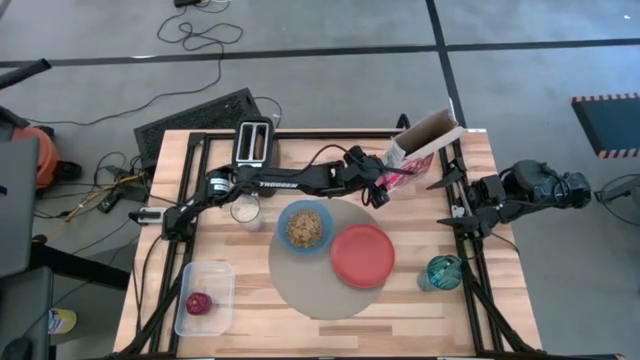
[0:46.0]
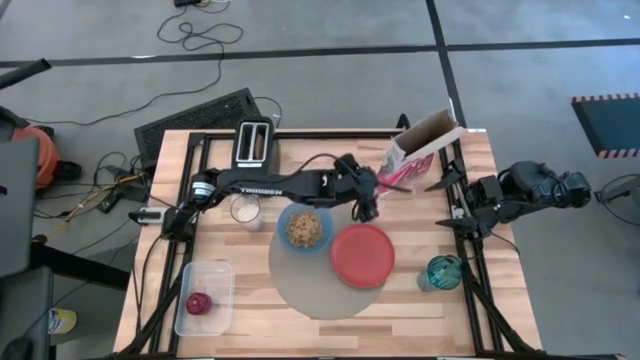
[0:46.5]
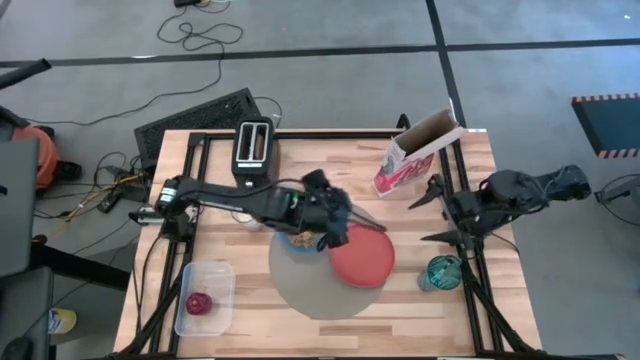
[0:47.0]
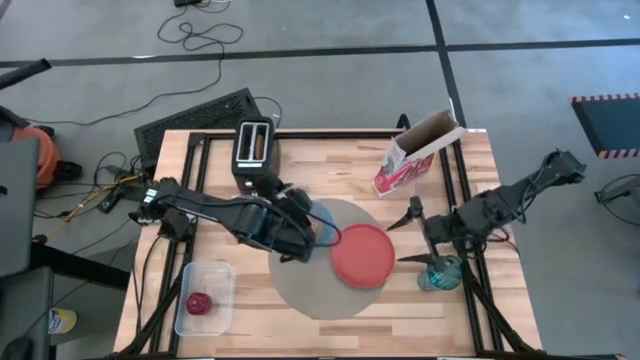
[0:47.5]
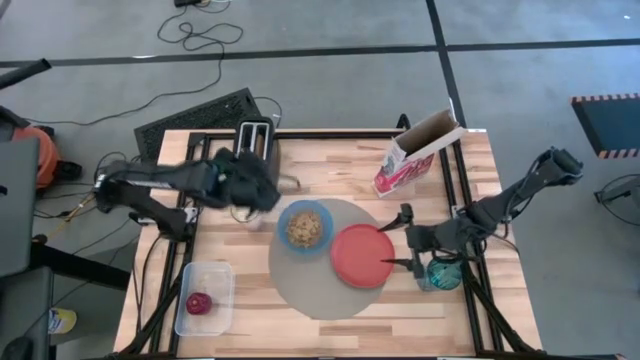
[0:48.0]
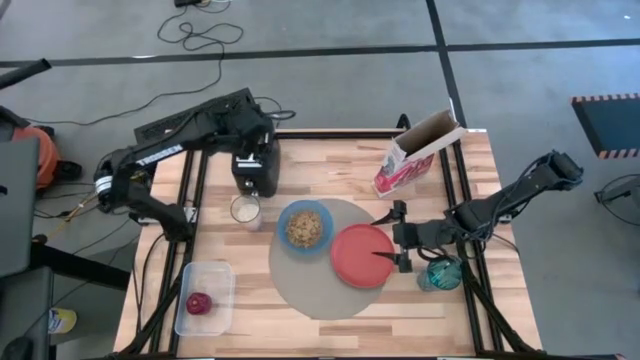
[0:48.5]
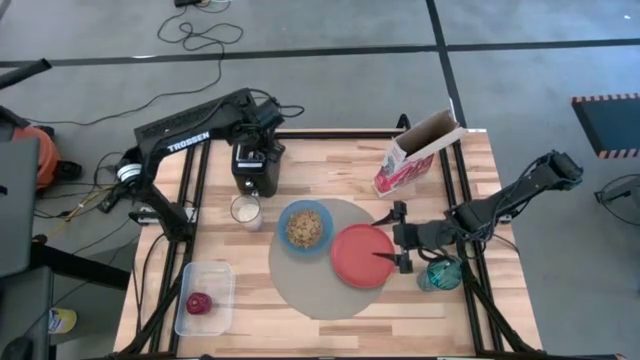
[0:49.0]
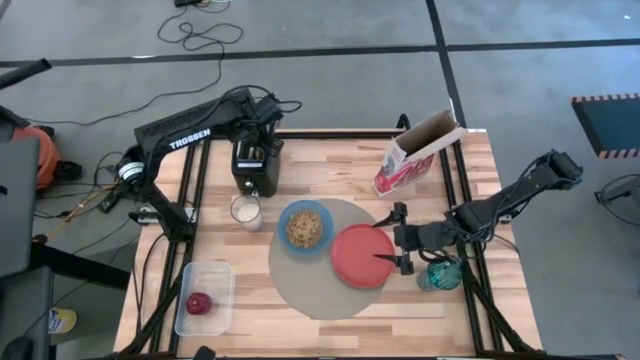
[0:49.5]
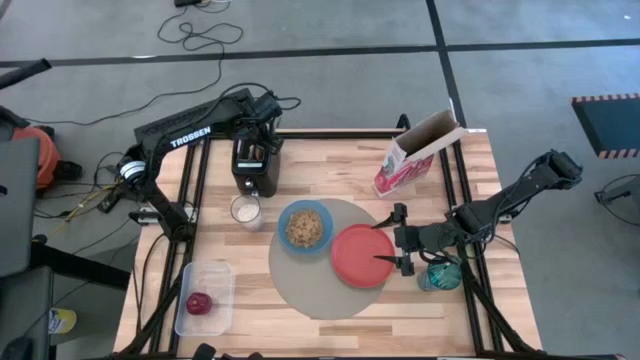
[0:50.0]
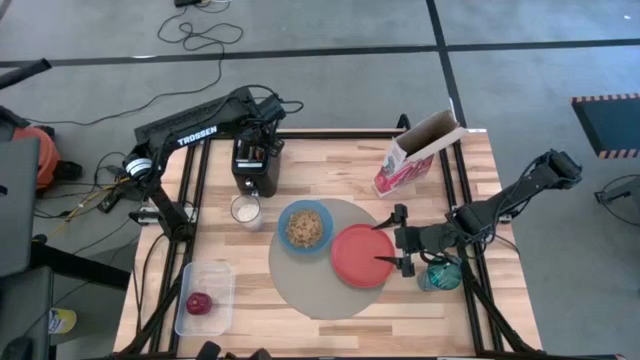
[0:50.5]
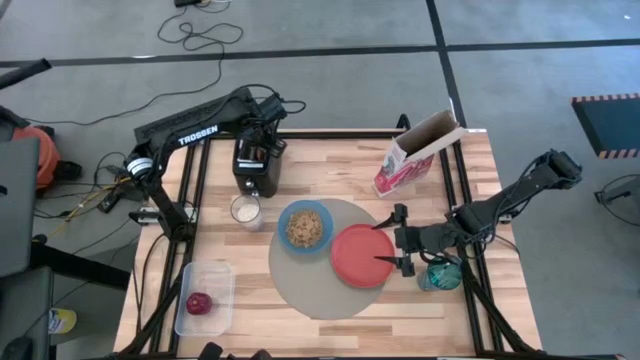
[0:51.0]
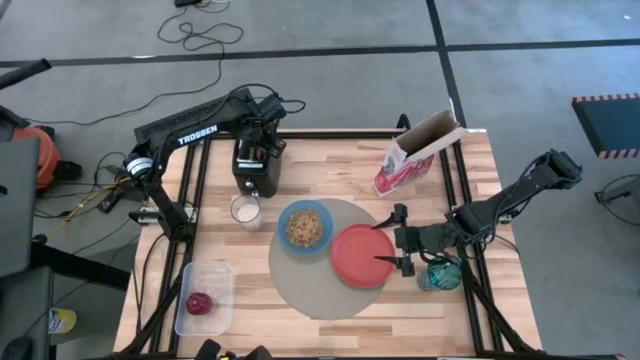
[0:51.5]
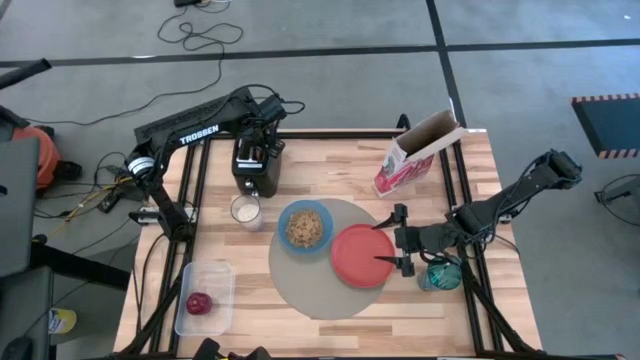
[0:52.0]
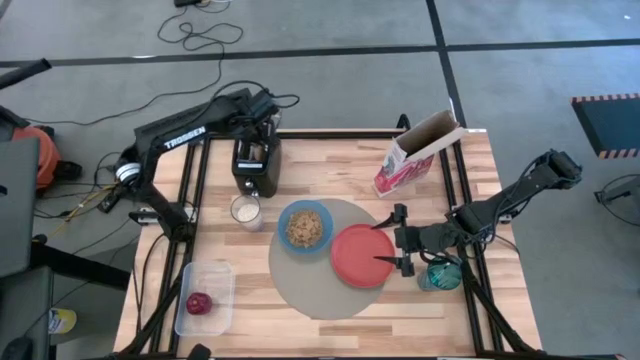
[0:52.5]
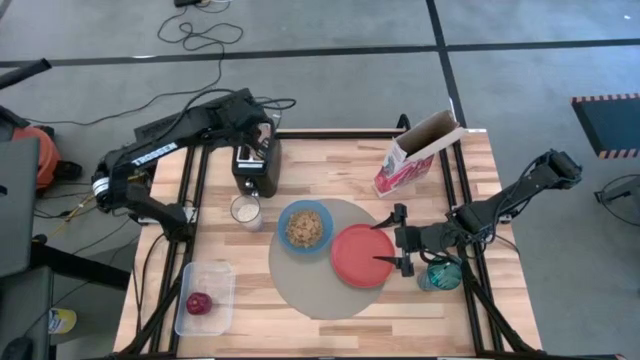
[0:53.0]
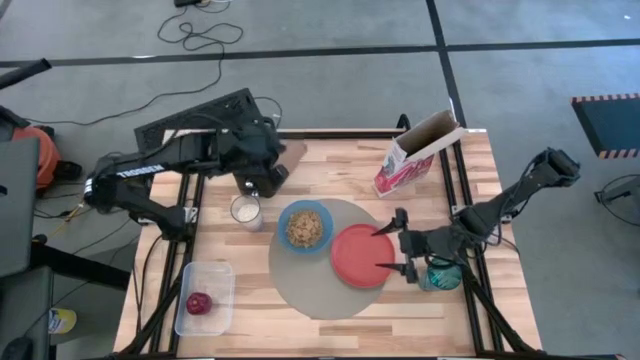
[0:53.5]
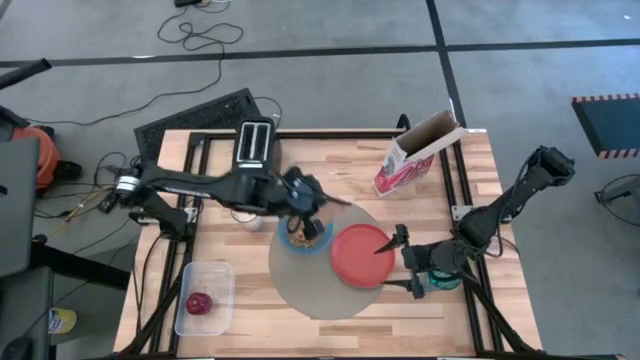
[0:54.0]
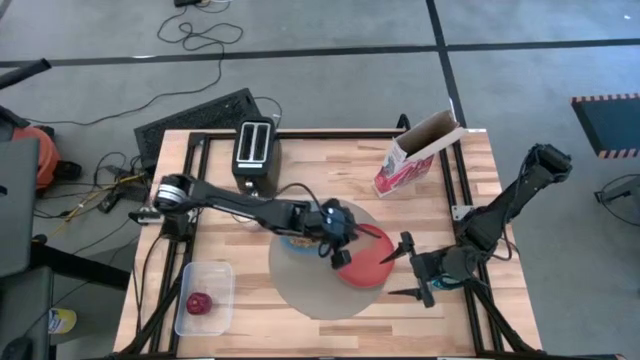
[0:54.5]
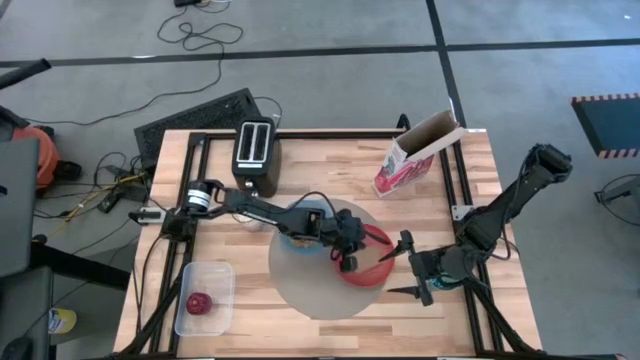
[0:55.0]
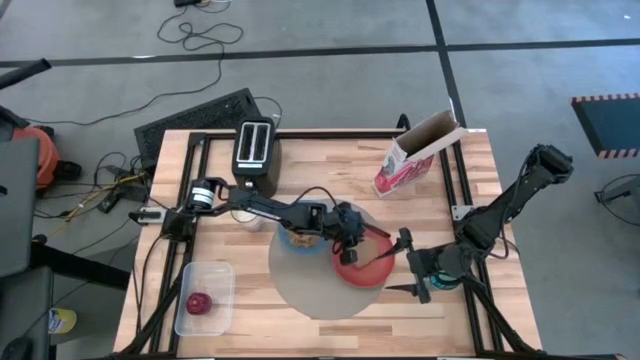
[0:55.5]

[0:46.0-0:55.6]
Task: Arrange a breakfast setting
Put the toasted bread on the orange plate

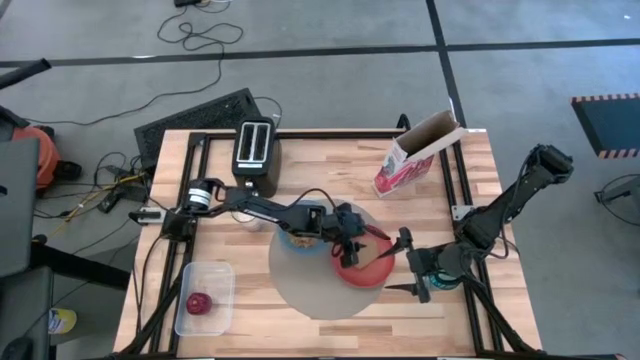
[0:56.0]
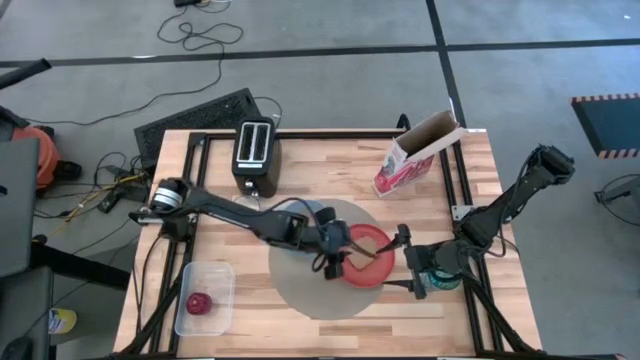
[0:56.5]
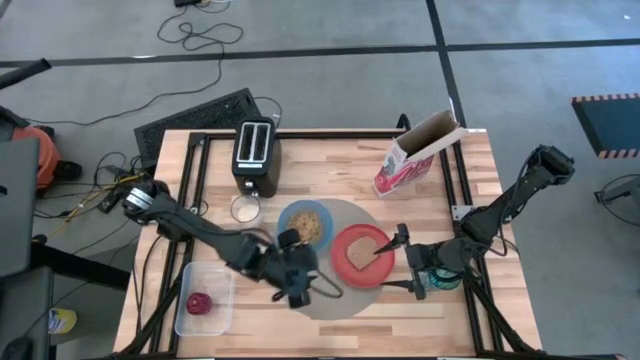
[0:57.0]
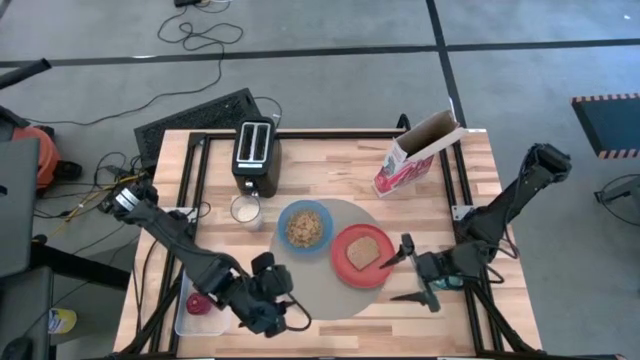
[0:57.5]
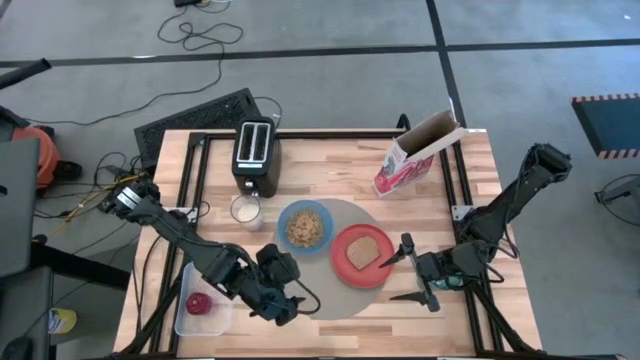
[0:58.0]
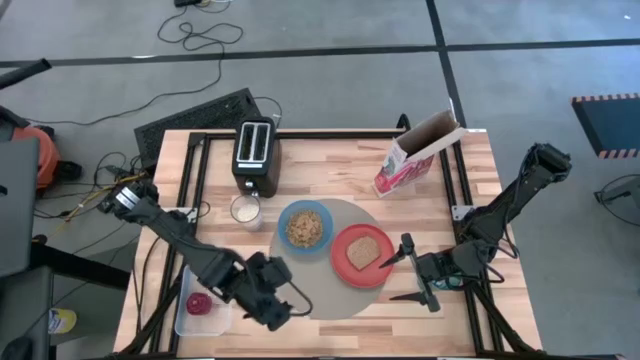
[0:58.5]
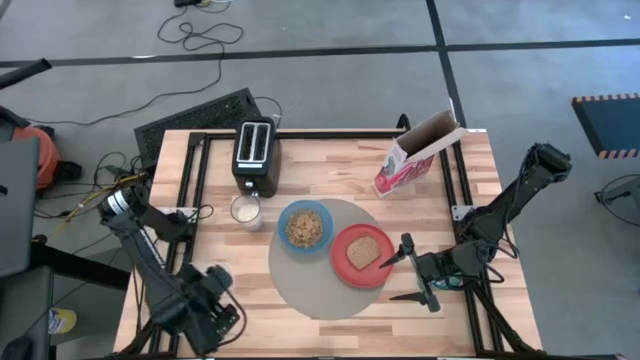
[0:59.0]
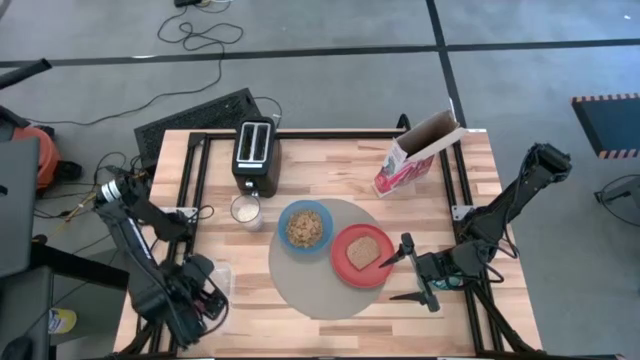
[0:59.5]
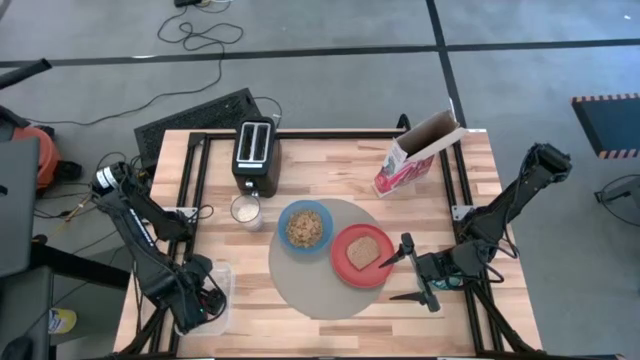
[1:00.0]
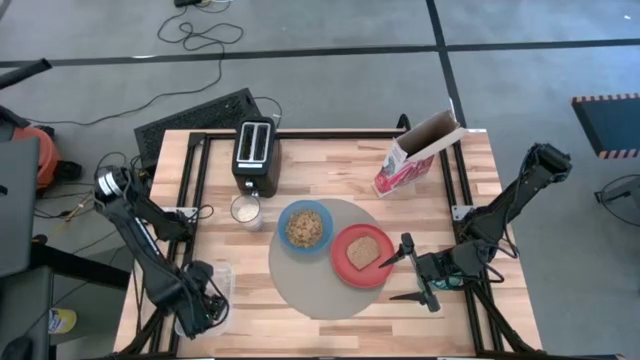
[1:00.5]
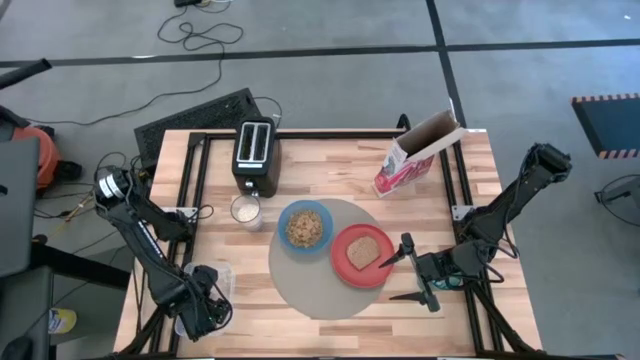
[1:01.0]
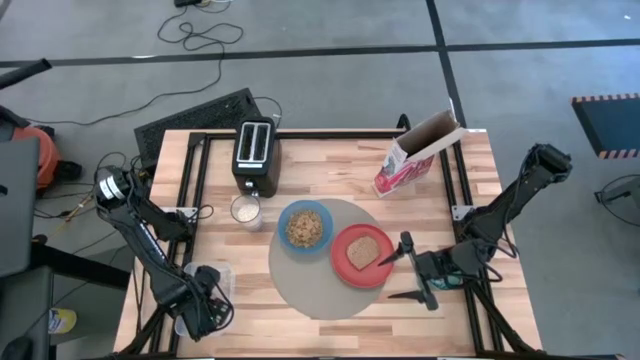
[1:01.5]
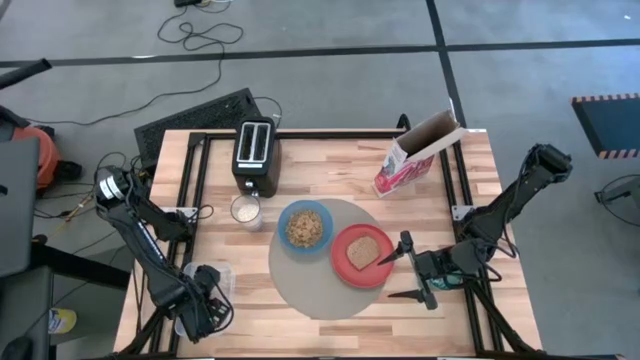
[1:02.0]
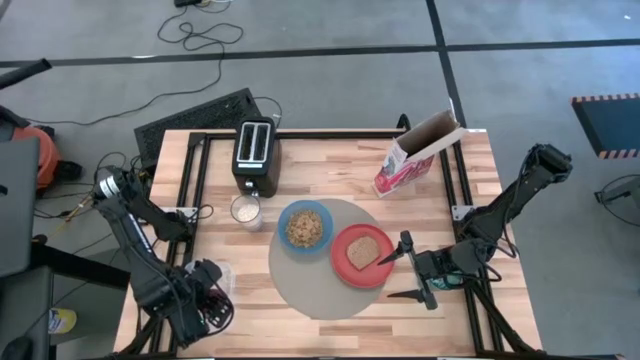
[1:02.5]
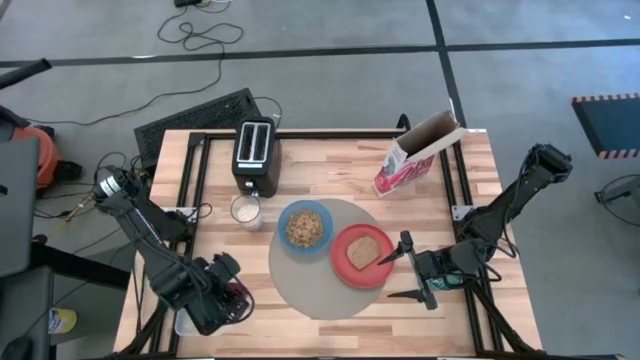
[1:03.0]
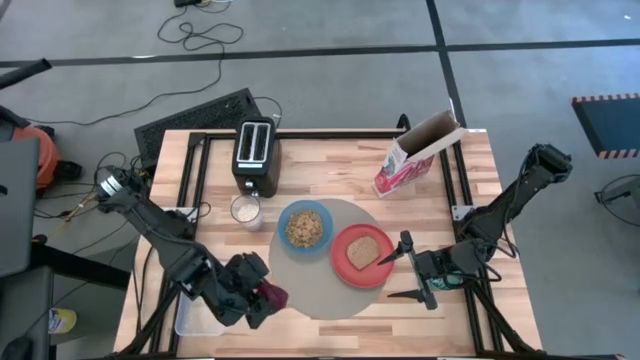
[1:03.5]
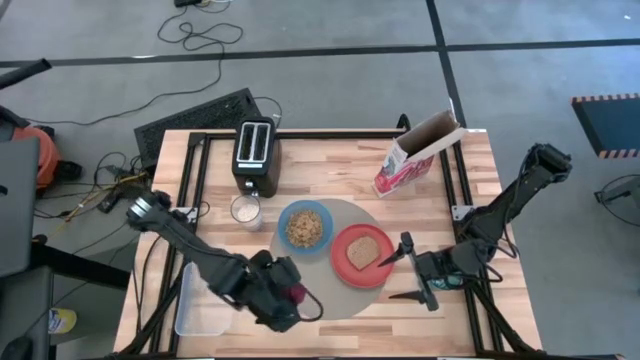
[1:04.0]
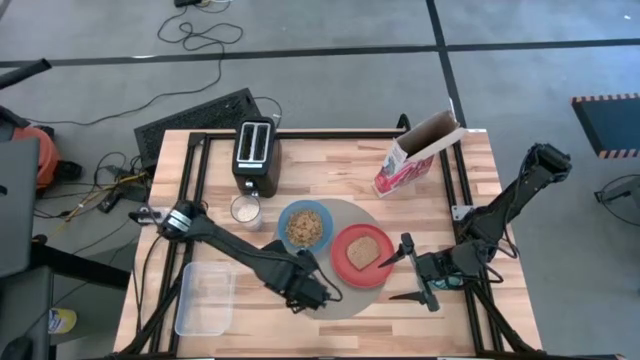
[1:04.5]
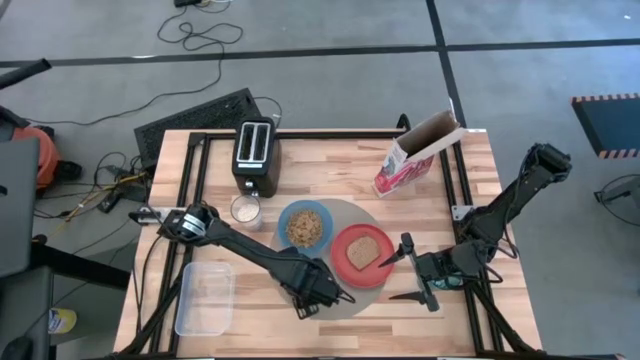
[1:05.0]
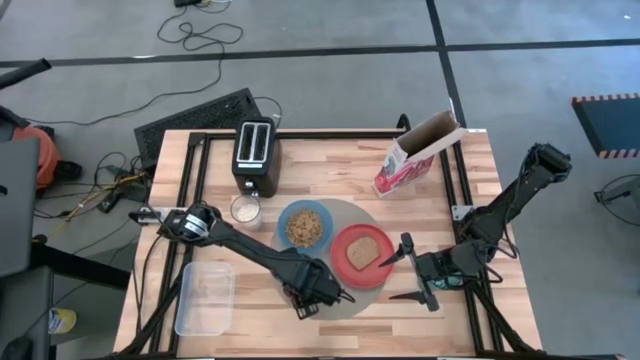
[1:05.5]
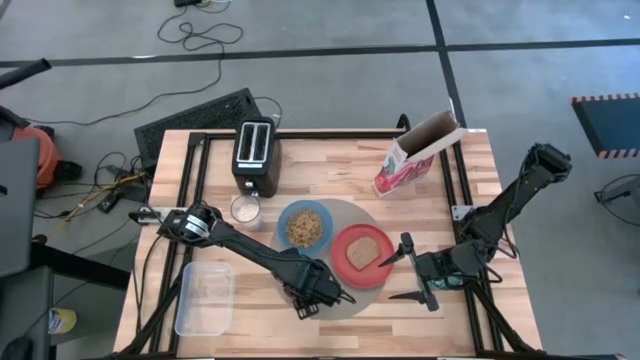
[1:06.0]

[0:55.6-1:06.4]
Put the apple on the gray placemat
